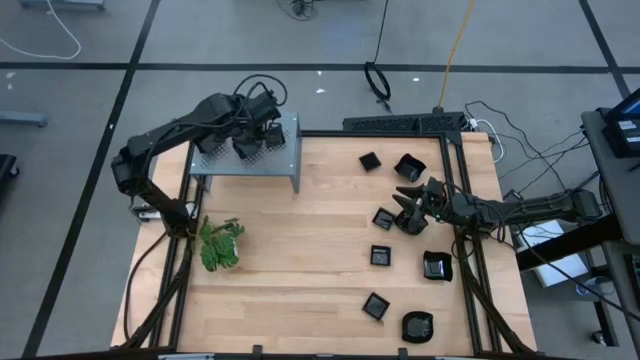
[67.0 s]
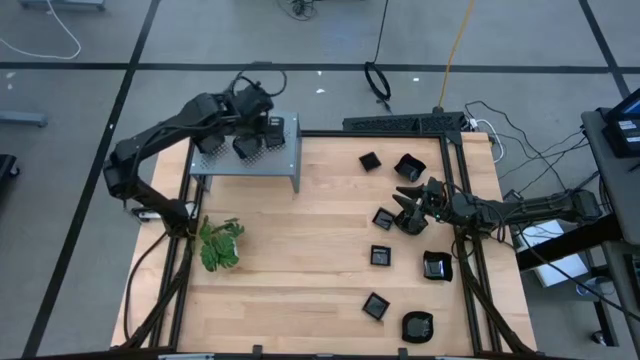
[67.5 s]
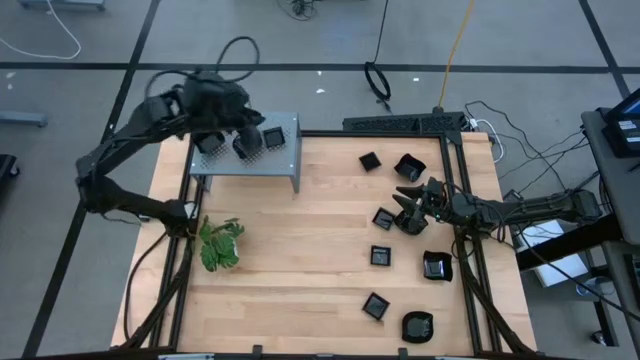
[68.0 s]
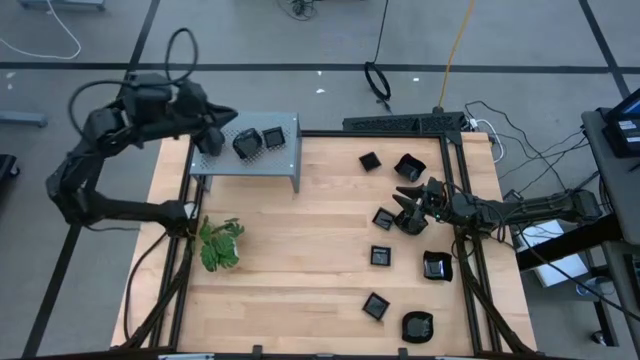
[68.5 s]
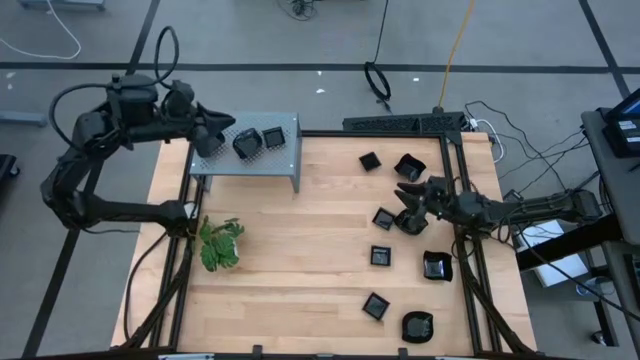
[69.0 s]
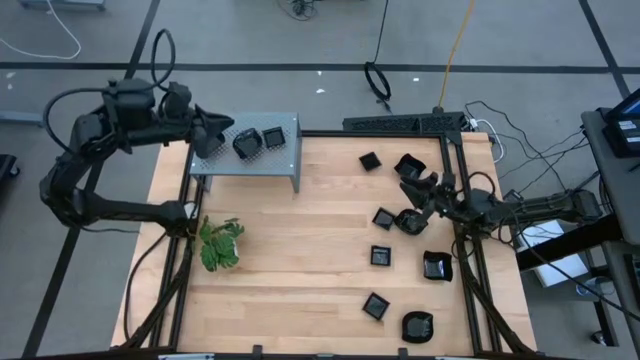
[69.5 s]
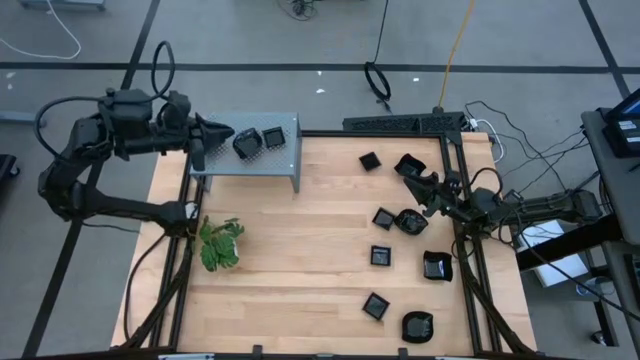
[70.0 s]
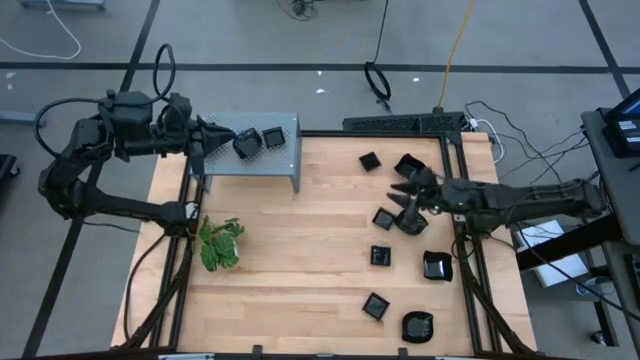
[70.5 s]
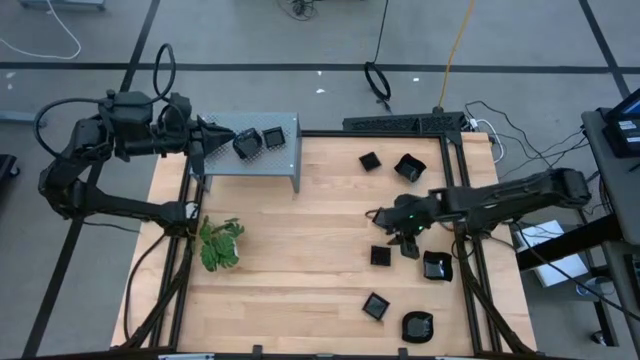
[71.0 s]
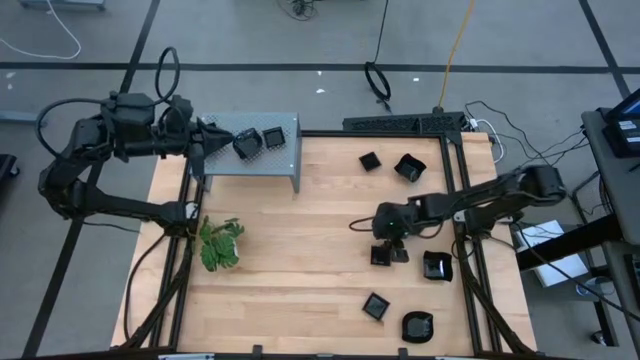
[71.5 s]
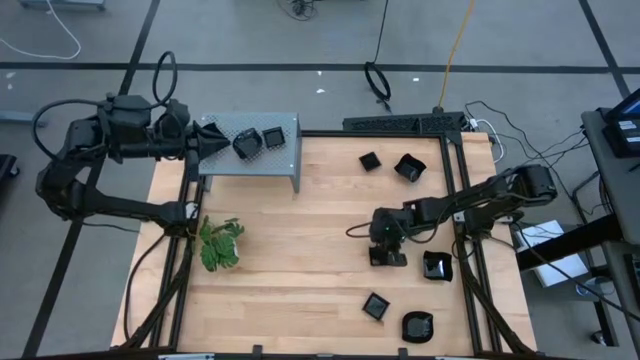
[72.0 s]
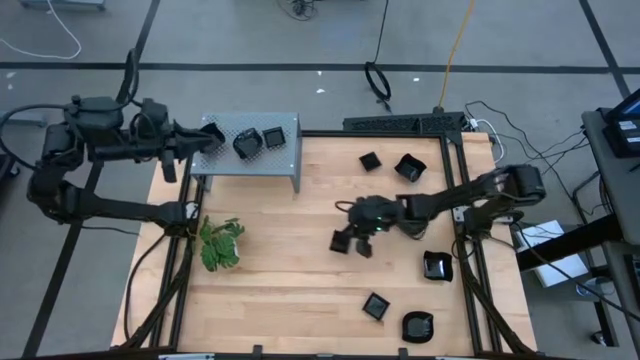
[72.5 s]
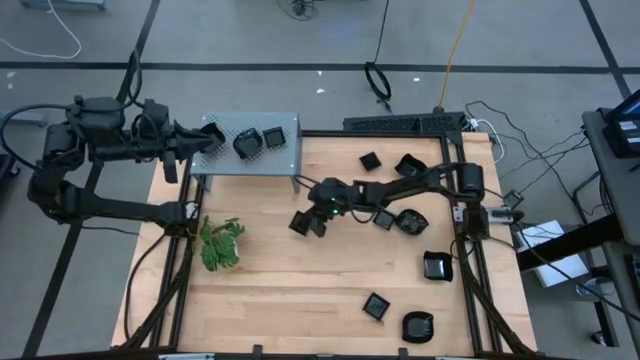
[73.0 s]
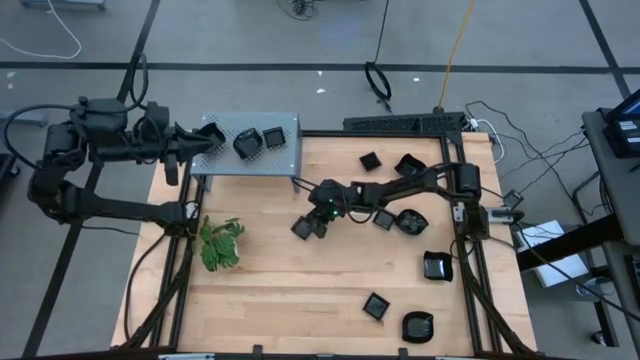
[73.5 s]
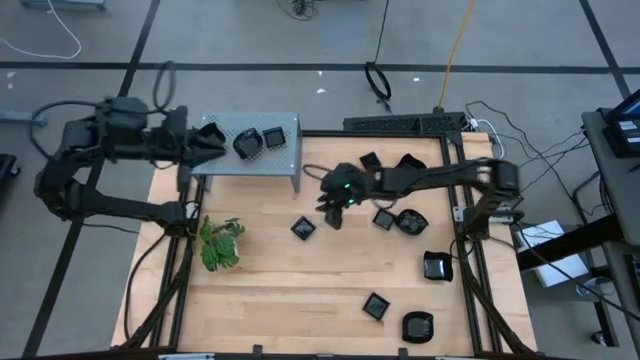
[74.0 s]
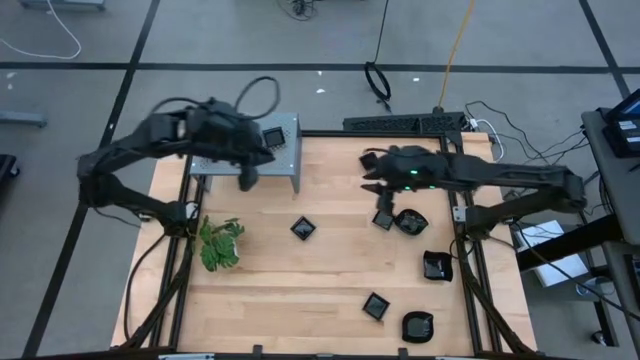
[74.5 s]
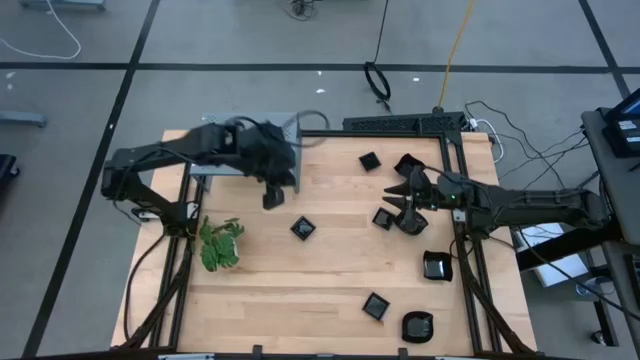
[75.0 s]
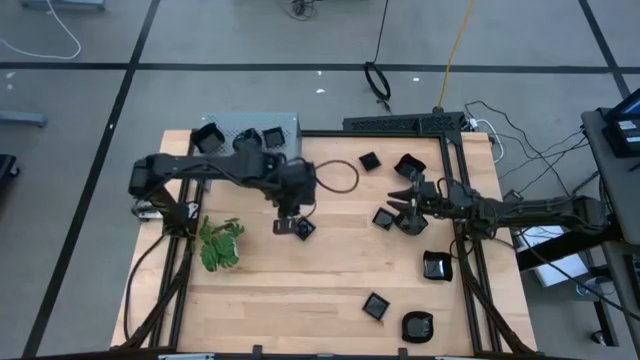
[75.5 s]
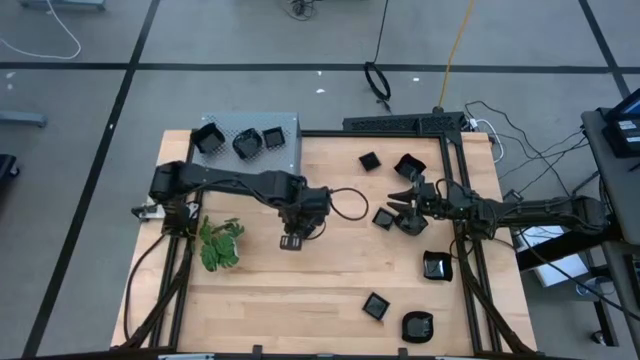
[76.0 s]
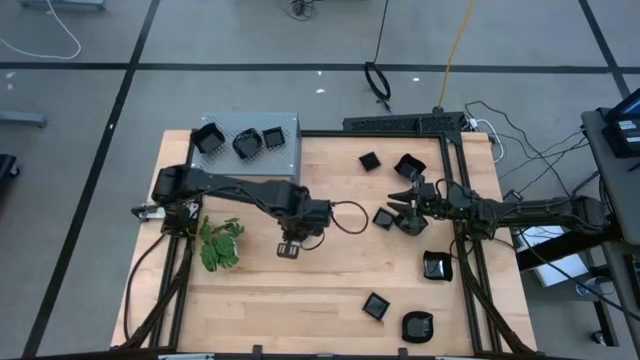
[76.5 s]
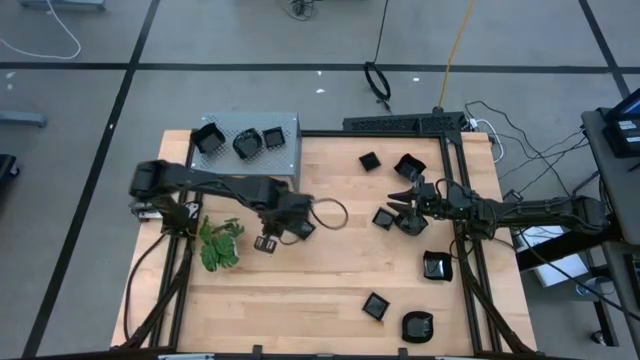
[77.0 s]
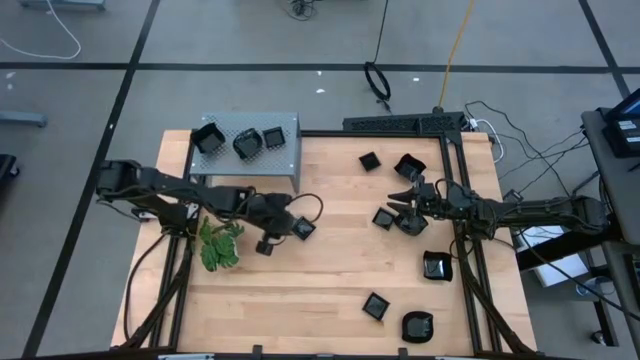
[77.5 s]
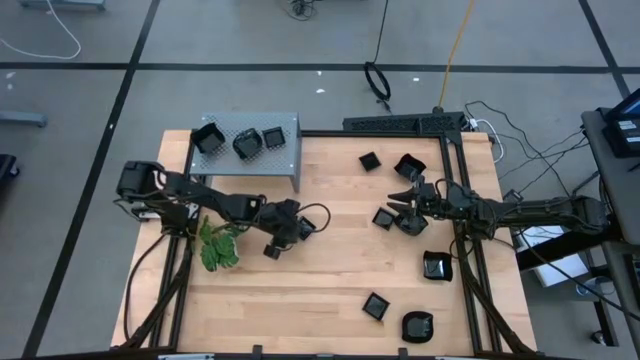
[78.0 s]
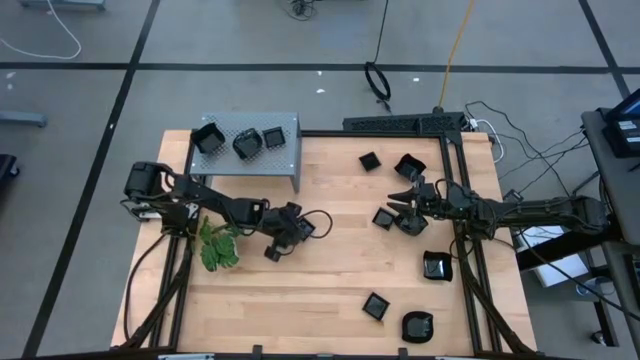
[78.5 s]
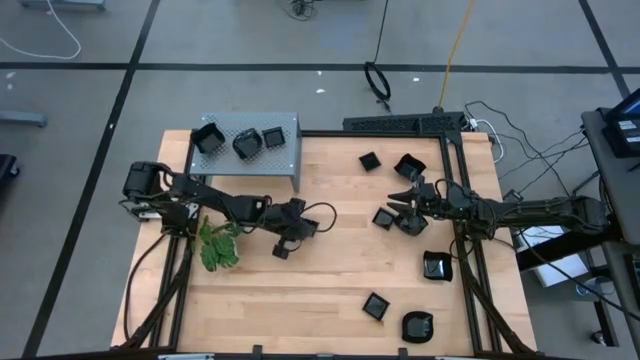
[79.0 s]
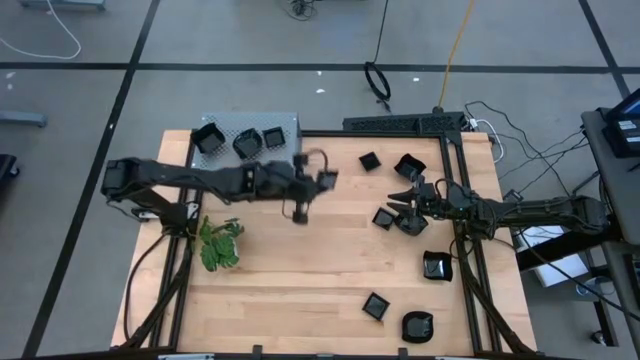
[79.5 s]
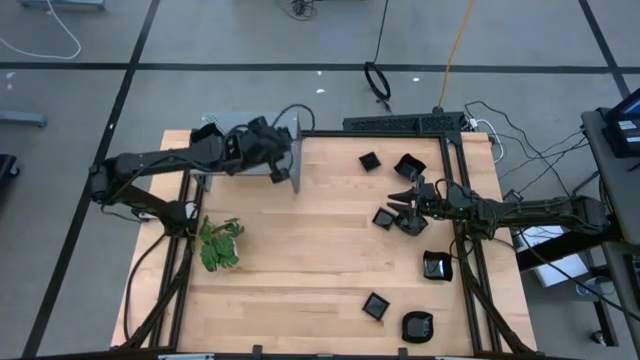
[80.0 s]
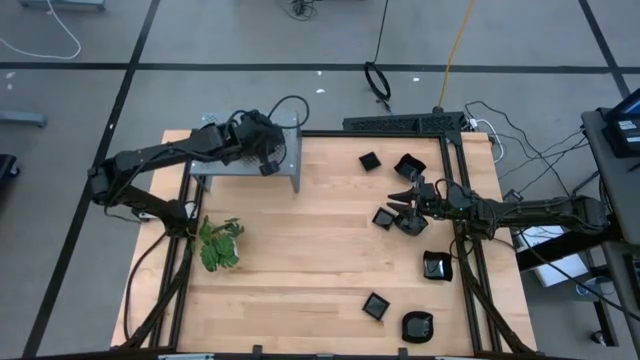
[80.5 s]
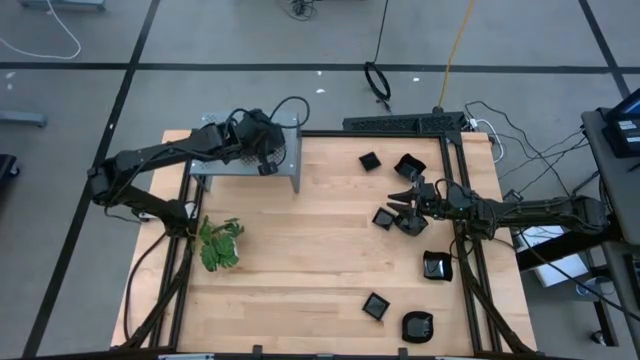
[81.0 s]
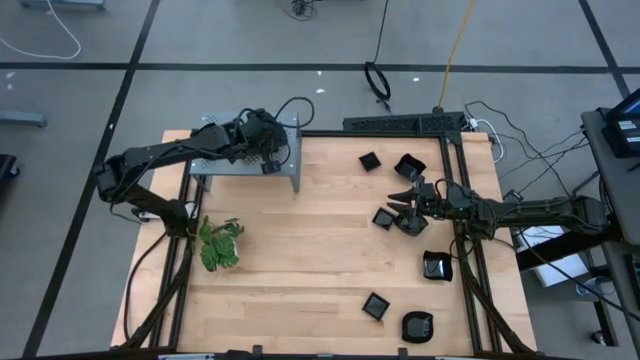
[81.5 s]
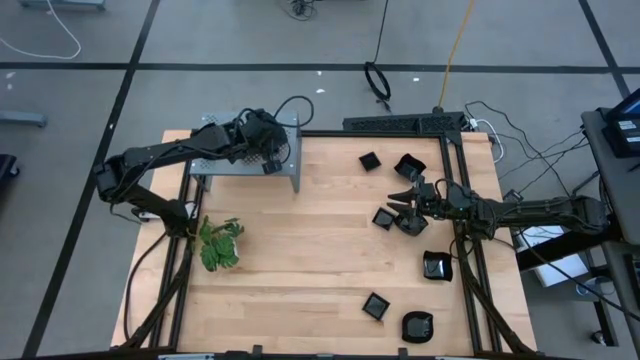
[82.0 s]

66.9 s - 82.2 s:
Task: Pick & Place Mini shaped plates
Stack the square plate on top of the square plate on the shelf

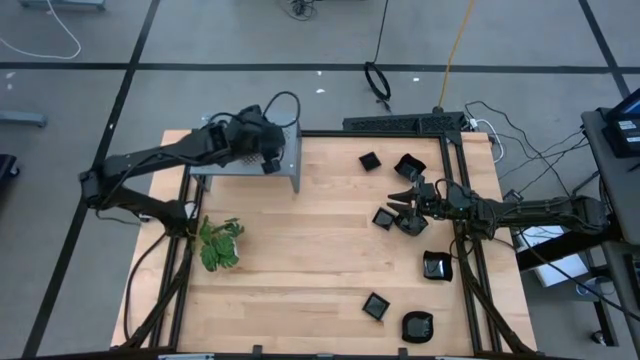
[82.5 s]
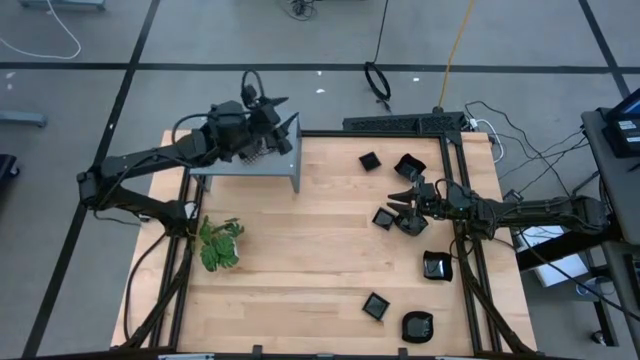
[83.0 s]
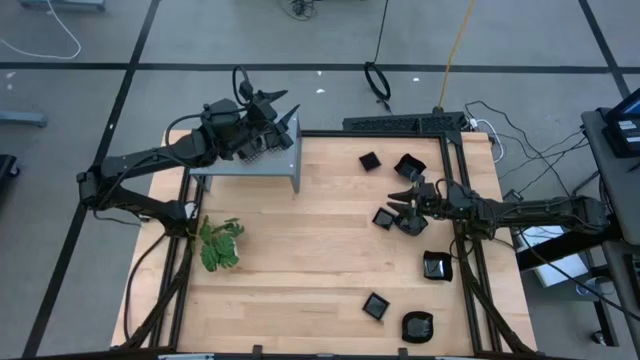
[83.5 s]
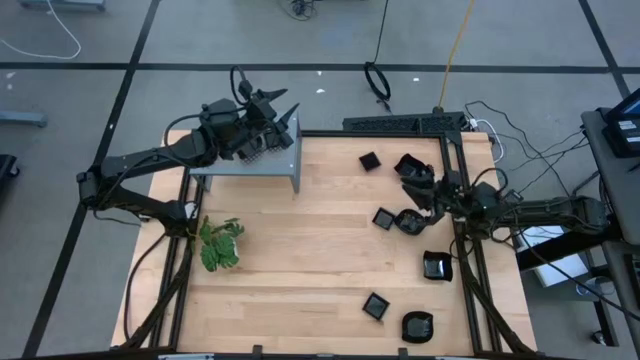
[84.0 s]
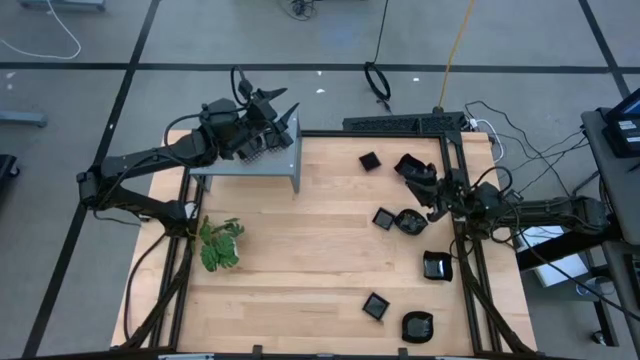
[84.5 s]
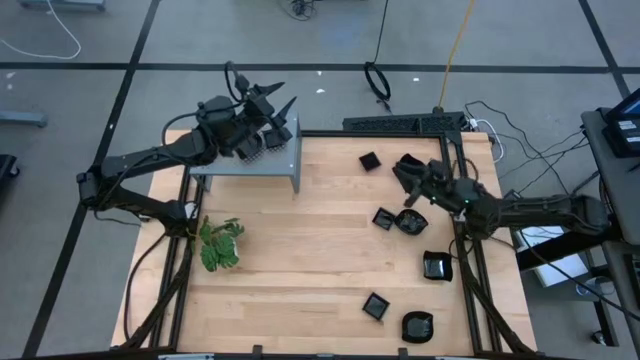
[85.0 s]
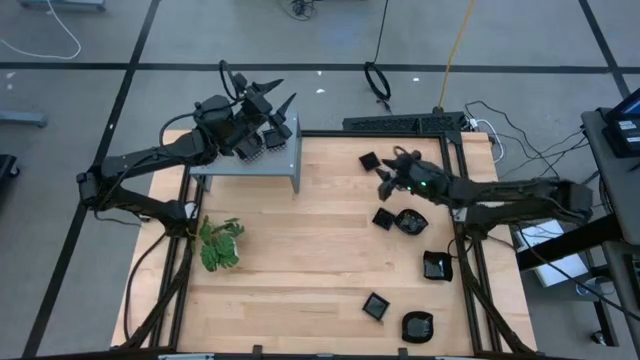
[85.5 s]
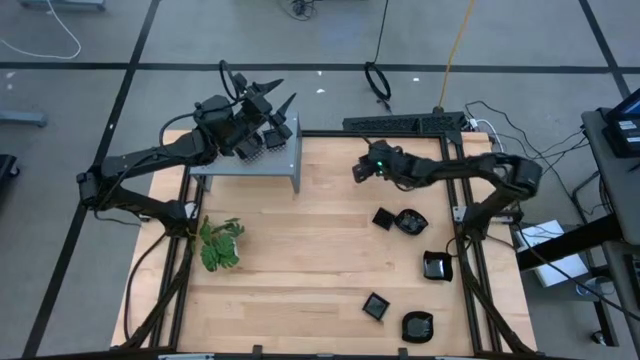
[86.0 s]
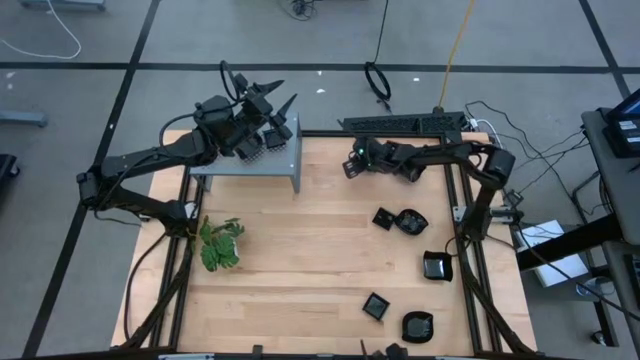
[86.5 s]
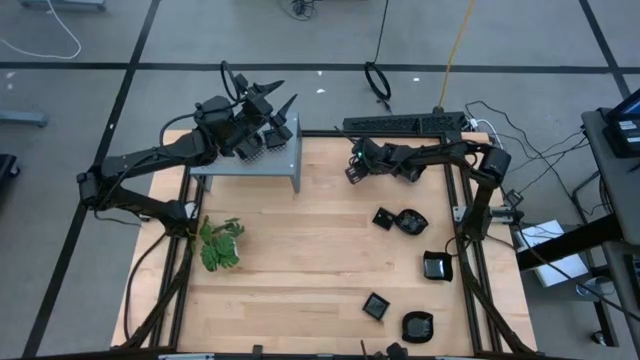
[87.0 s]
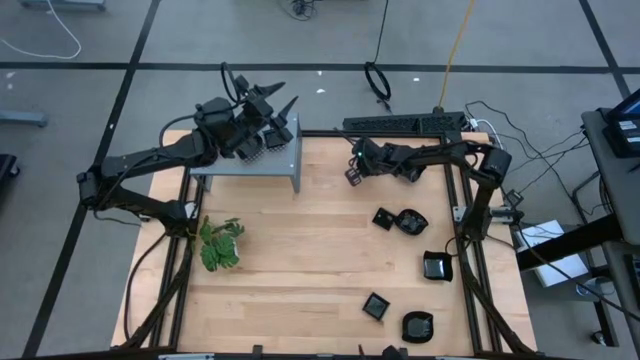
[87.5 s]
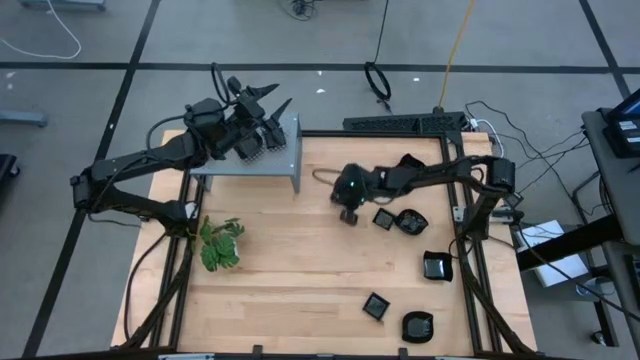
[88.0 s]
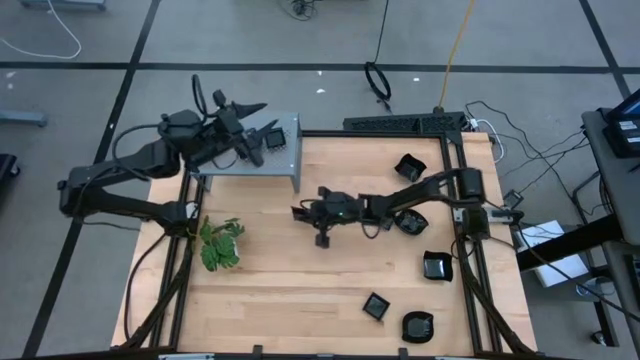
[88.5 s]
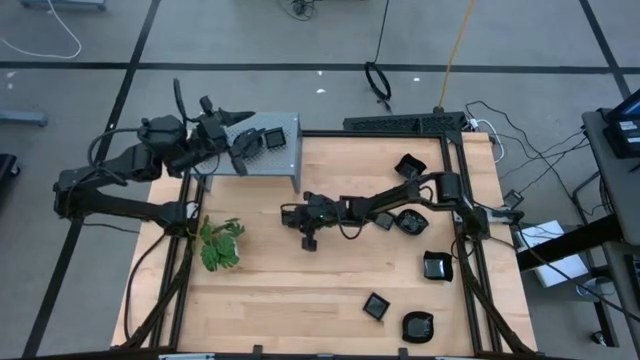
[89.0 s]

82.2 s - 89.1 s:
Move the square plate to the center of the table
